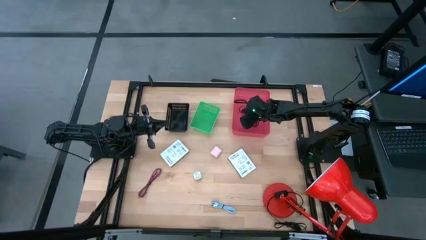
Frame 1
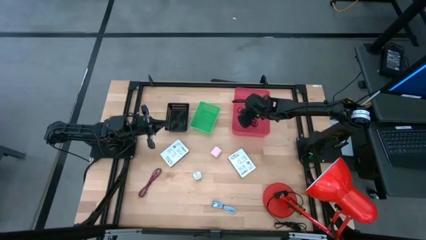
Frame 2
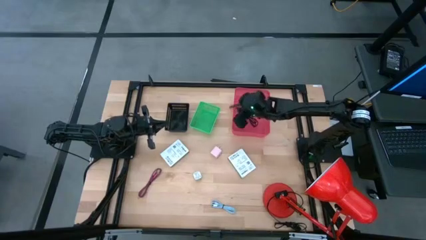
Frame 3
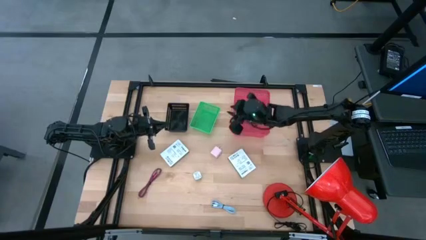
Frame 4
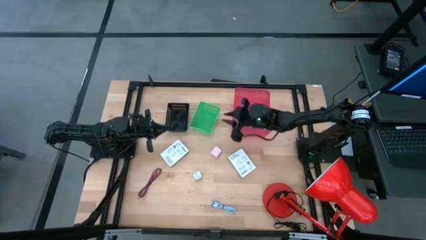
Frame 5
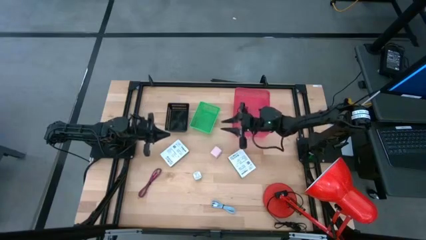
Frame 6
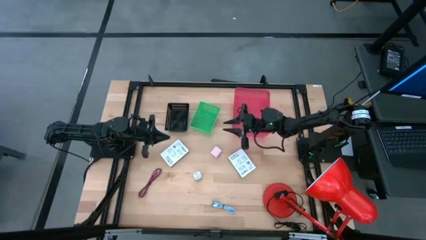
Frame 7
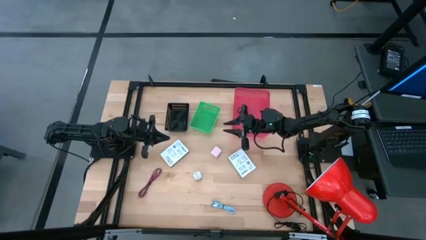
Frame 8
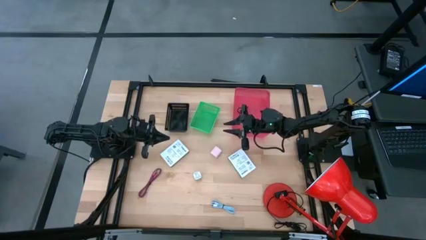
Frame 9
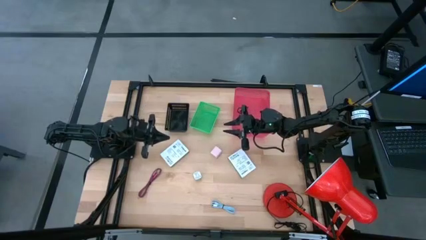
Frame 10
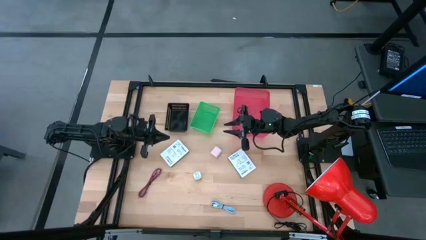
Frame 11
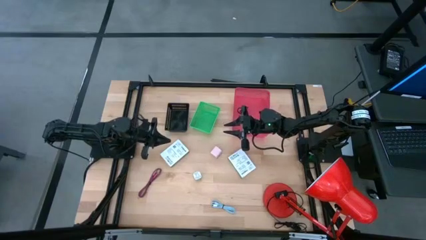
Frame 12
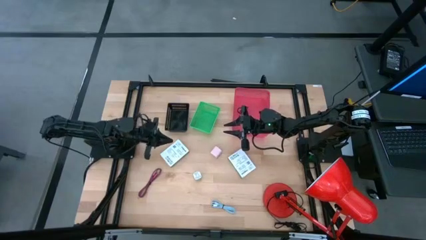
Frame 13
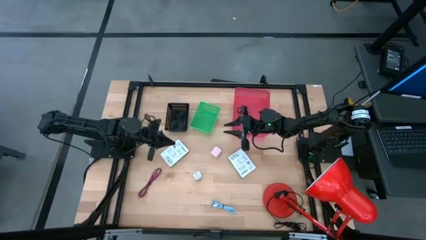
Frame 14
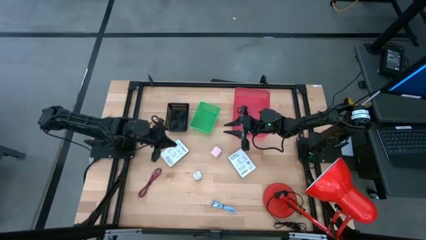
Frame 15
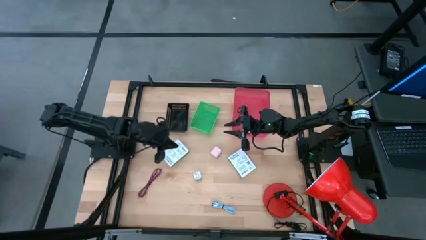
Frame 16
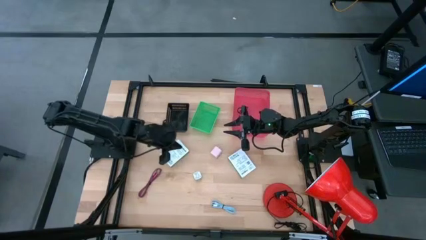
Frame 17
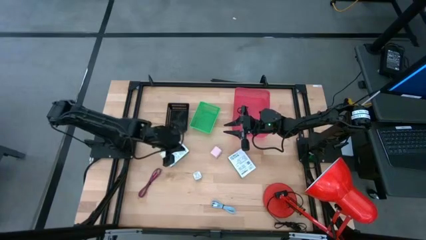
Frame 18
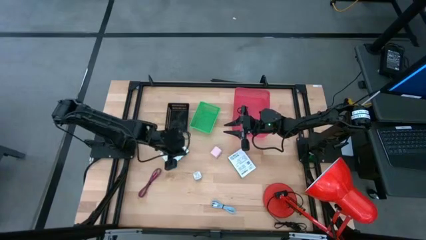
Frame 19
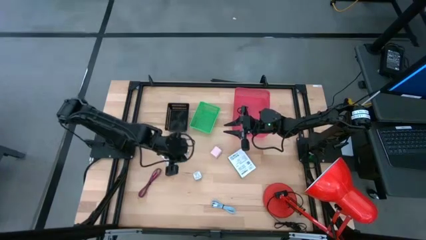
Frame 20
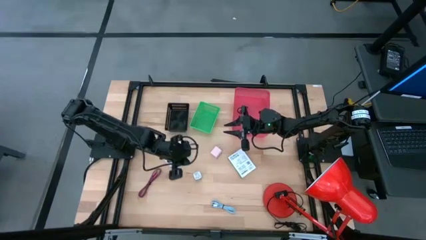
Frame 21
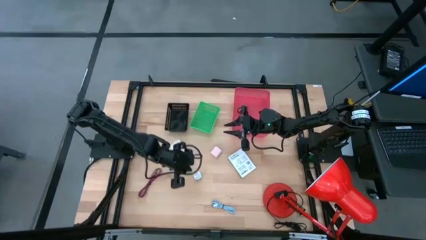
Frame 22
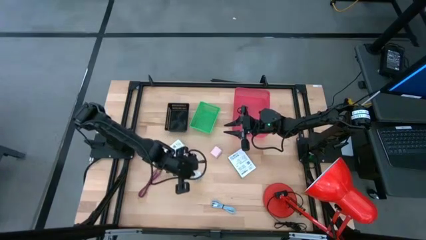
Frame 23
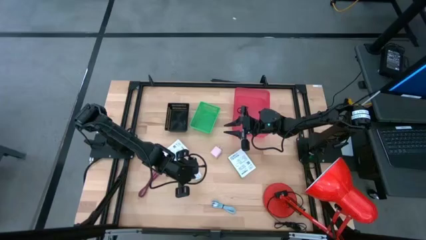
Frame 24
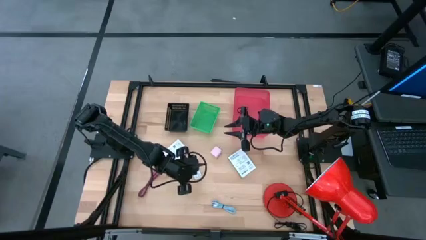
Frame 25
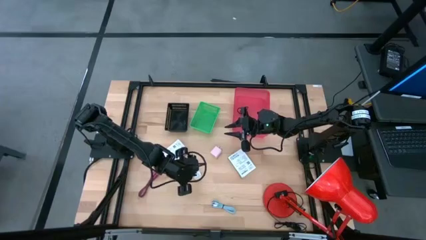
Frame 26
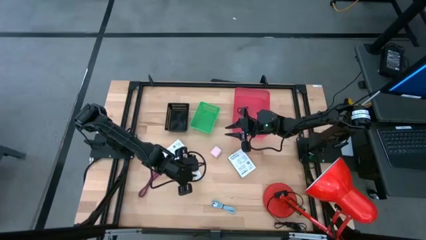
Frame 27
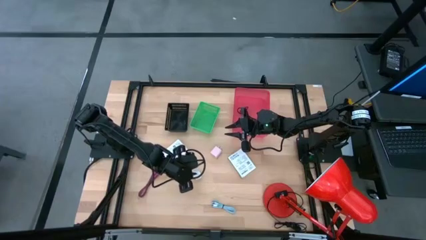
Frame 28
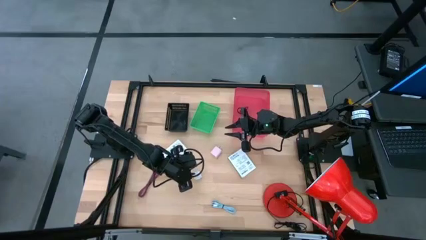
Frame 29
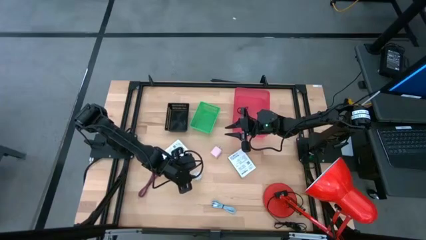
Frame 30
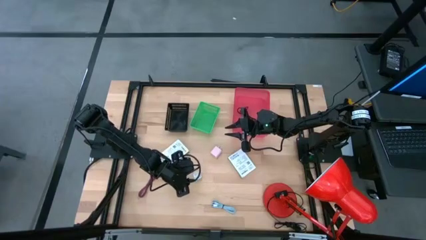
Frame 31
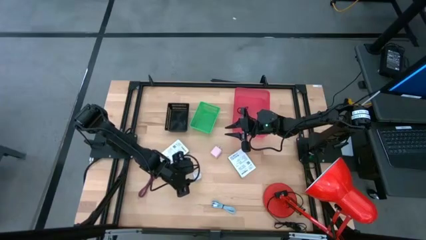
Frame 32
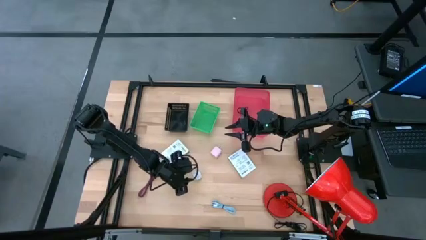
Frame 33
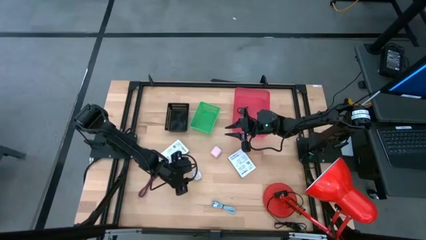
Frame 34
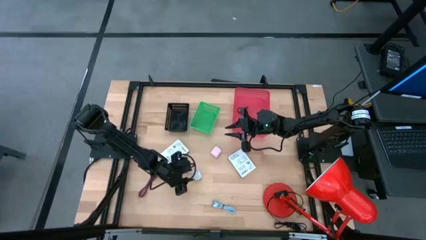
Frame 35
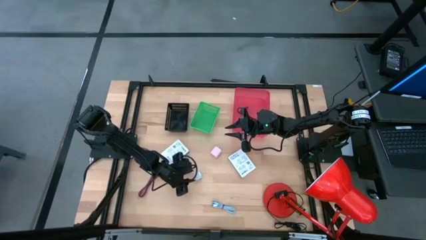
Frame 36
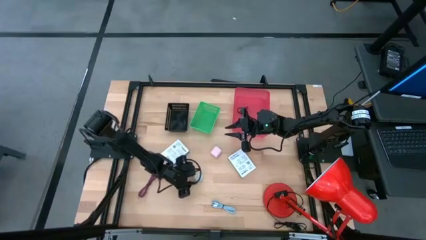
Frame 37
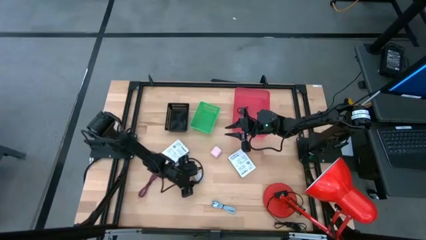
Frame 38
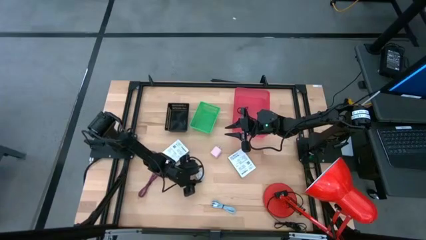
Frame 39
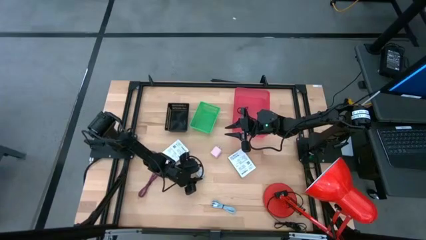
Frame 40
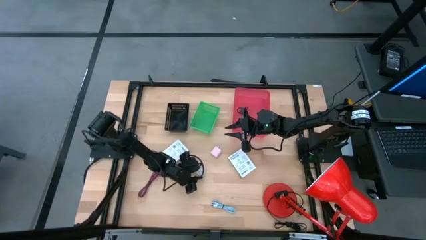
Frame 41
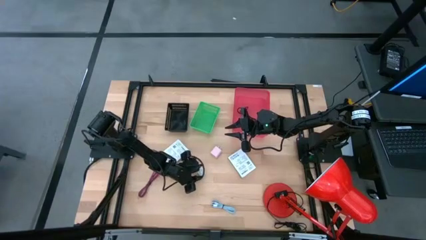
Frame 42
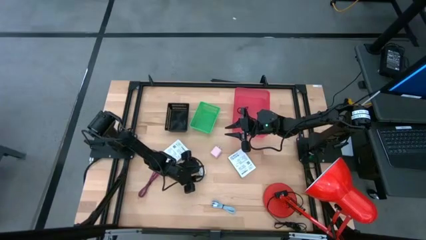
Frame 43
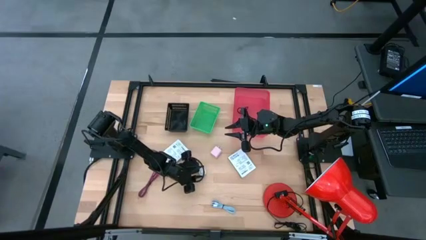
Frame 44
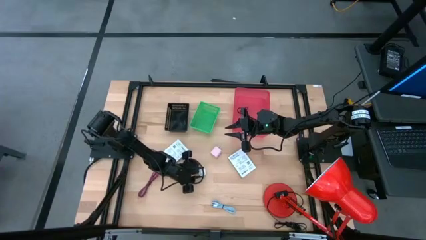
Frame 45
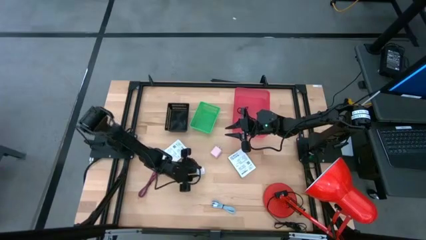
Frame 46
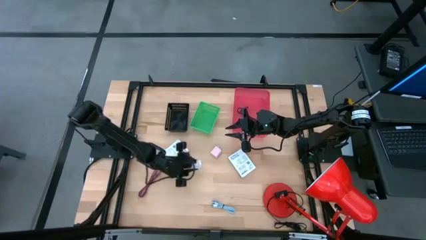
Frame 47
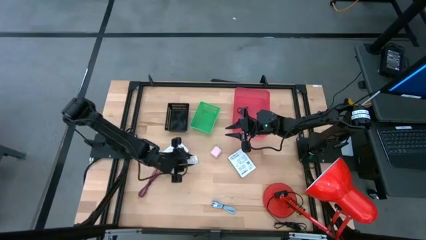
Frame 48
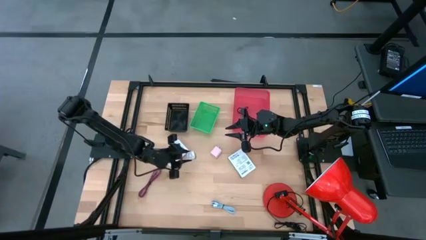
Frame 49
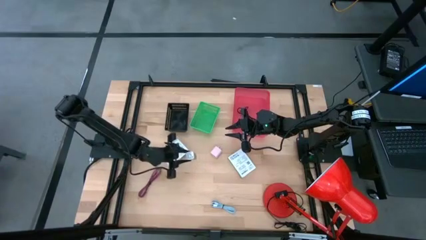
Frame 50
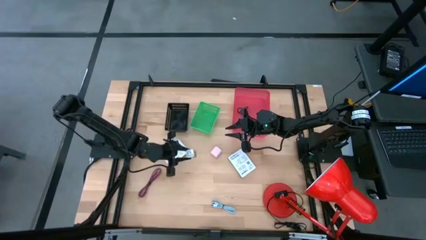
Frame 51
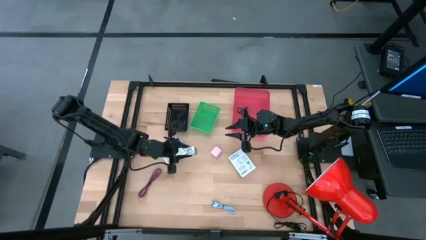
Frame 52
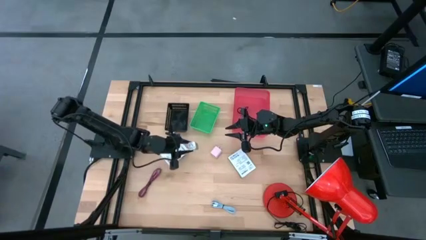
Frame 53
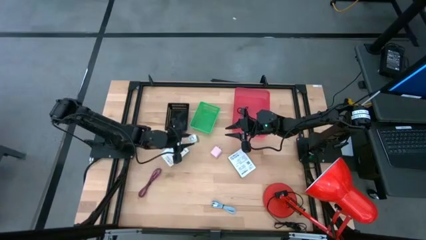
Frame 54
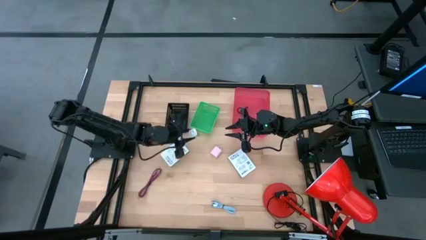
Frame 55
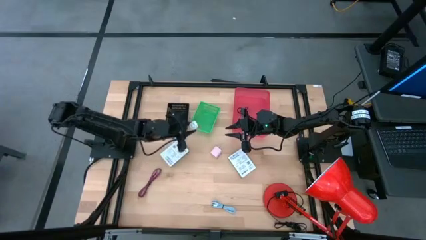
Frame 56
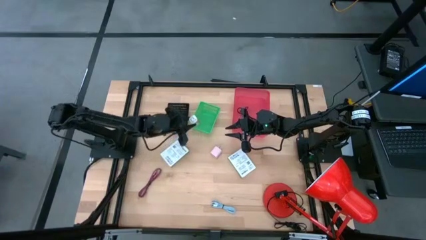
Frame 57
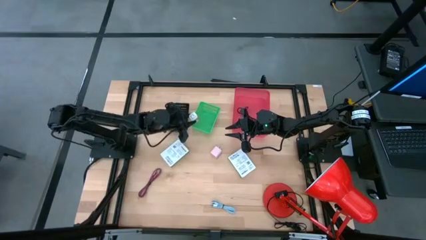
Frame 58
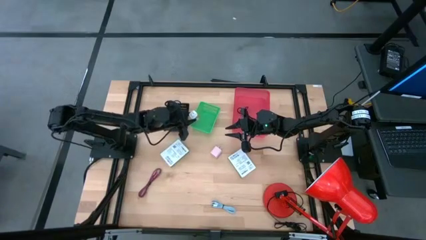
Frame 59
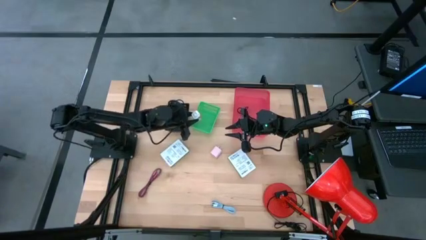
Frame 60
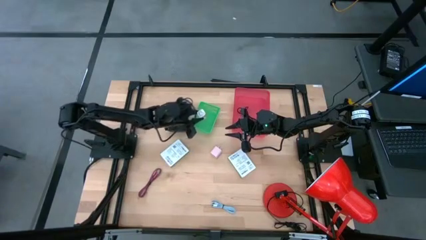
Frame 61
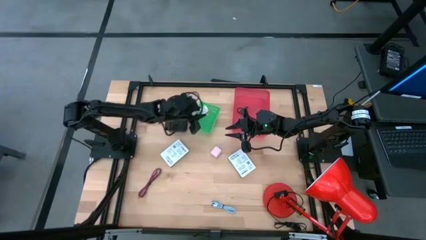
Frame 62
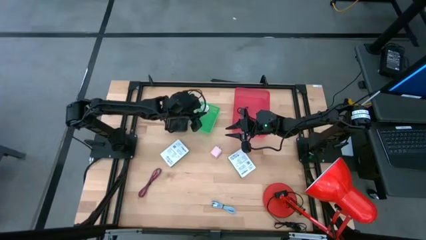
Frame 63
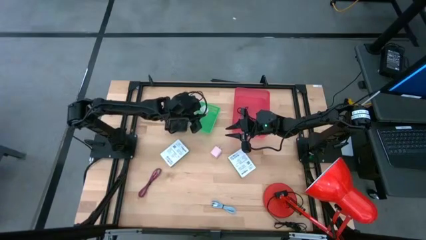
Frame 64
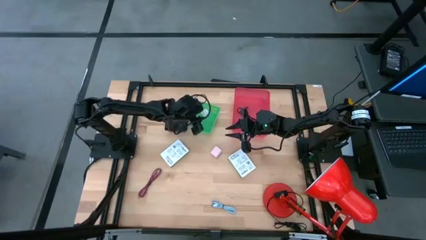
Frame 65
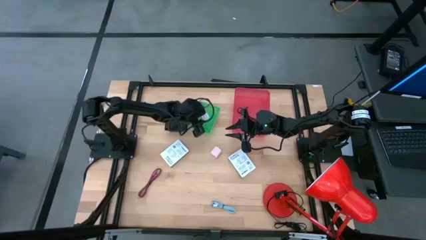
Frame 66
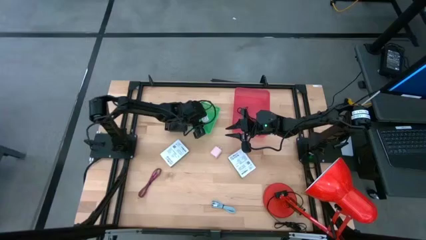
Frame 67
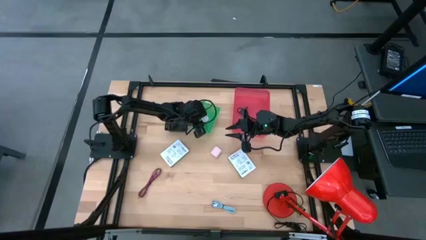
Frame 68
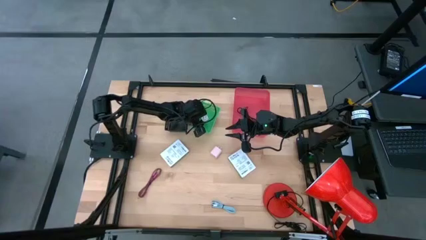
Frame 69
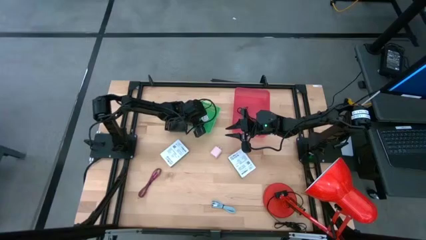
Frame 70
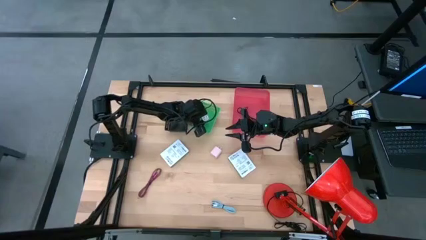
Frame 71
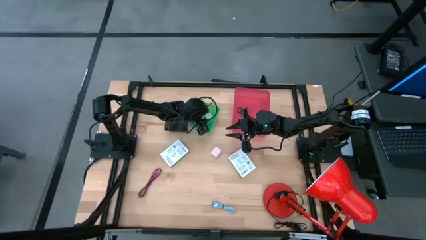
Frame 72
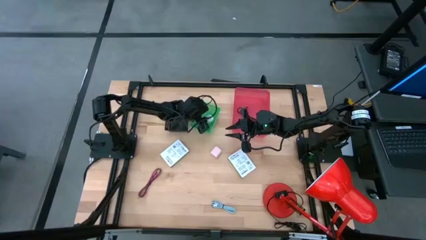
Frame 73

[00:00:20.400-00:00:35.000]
Task: Pick and place items into bin
Put the green charger adapter into the green bin
